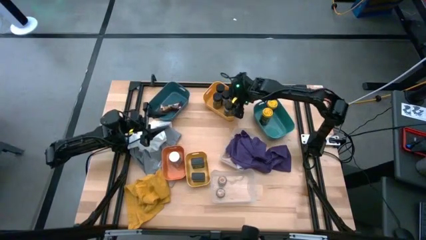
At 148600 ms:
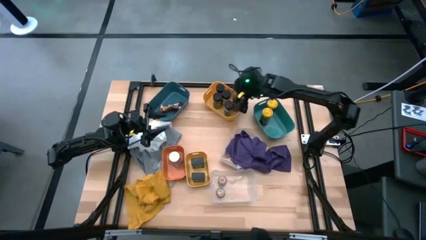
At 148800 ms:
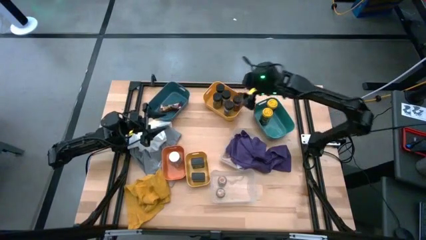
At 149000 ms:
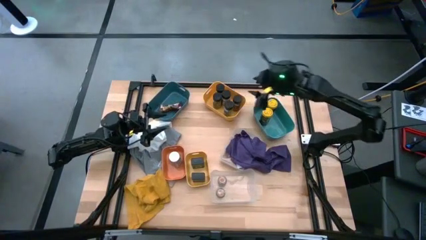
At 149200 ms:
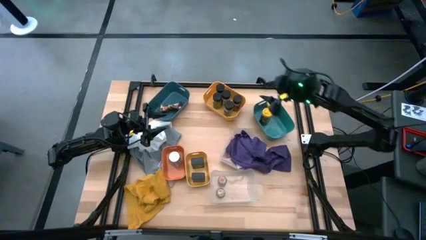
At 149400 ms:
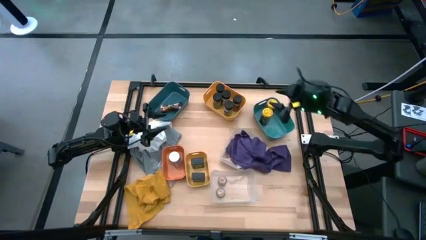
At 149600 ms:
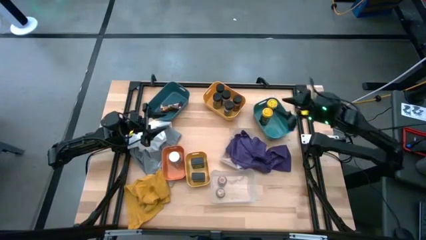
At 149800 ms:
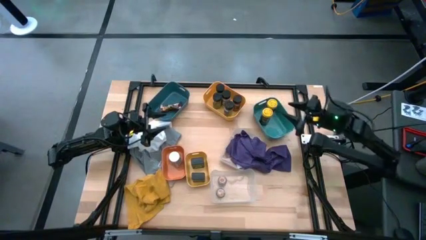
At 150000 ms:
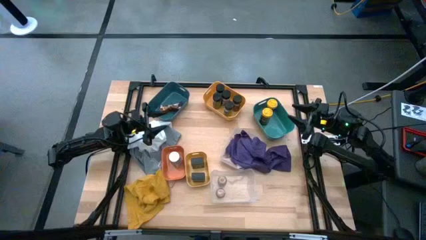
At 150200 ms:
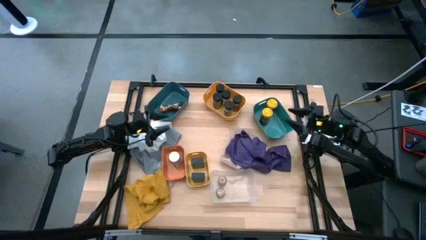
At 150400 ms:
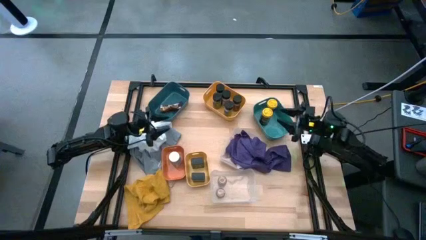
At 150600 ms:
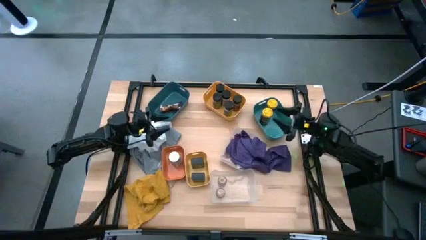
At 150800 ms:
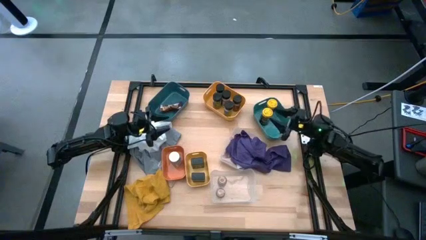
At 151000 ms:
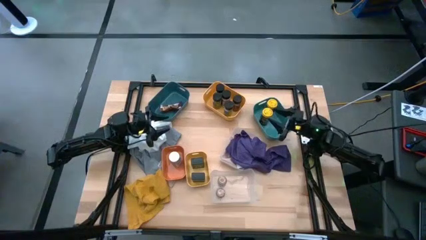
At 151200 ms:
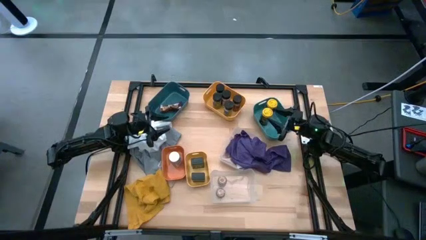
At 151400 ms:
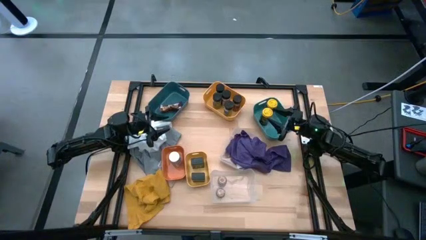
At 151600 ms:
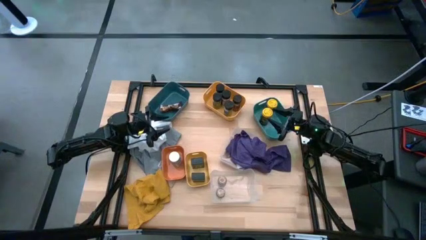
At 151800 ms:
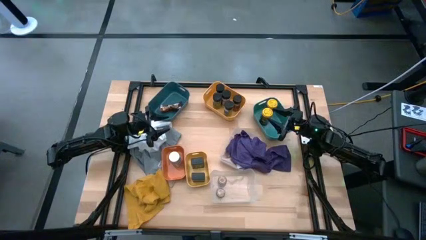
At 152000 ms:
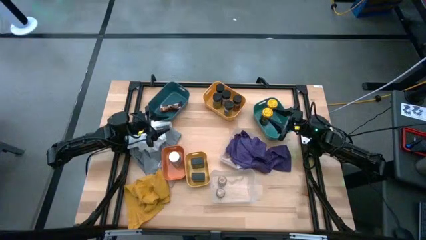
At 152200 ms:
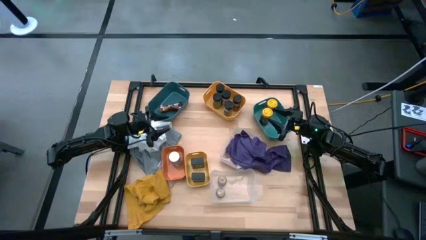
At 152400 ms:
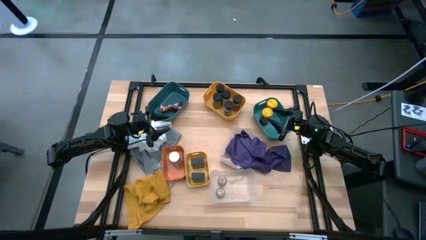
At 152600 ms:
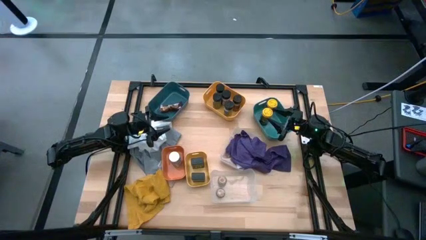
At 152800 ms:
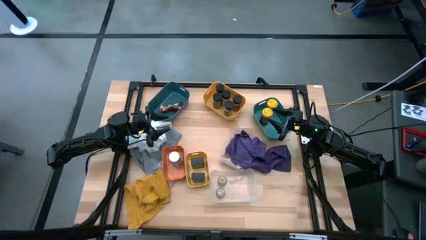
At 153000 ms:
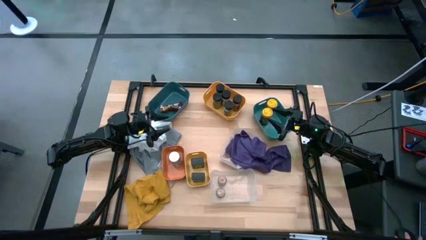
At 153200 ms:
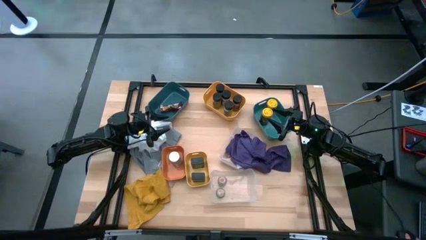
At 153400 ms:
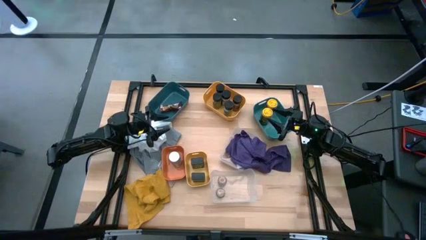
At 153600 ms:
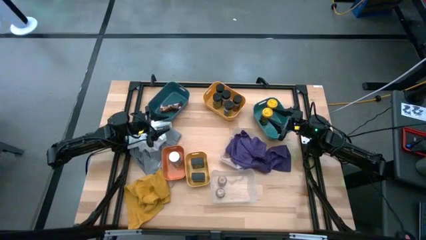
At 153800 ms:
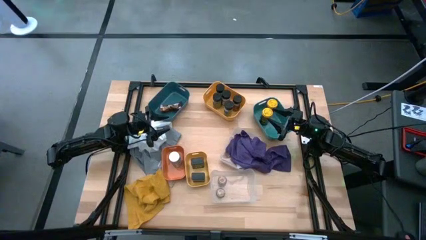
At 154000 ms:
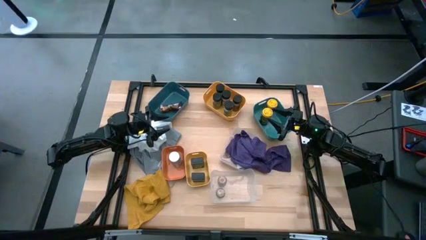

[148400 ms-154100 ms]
Task: Sort spices by type
Return to Home Position

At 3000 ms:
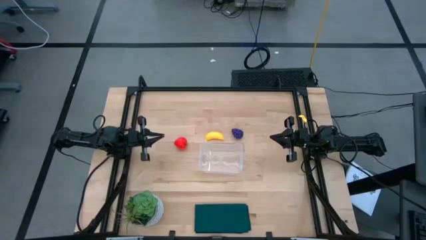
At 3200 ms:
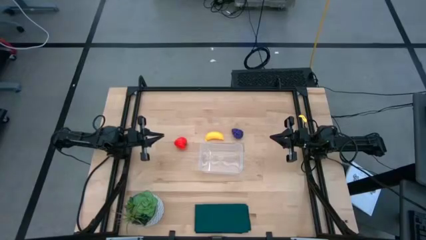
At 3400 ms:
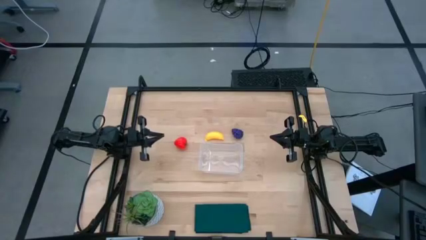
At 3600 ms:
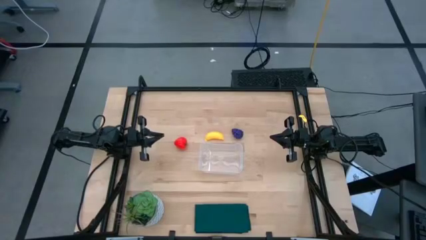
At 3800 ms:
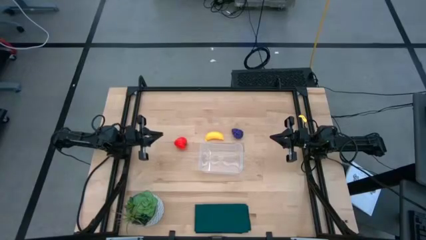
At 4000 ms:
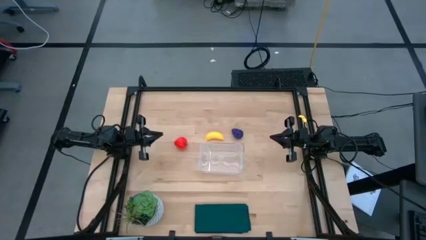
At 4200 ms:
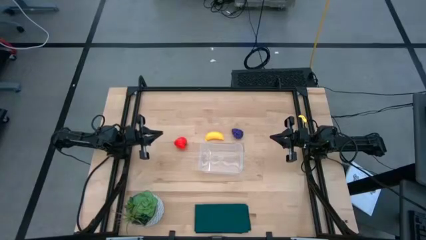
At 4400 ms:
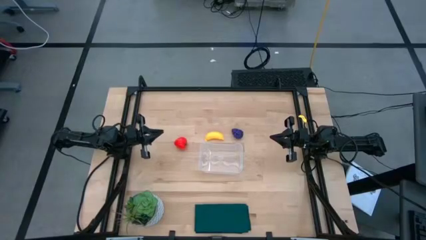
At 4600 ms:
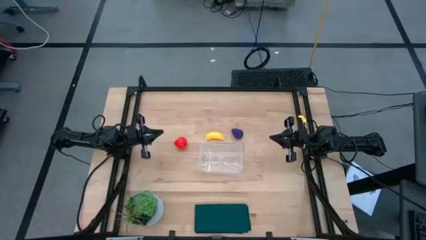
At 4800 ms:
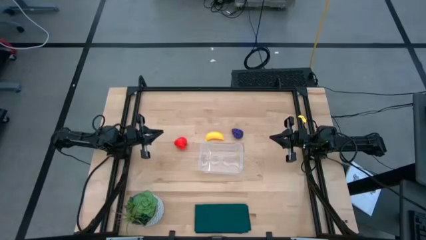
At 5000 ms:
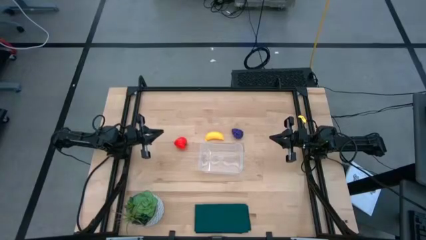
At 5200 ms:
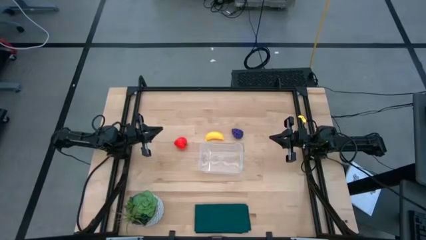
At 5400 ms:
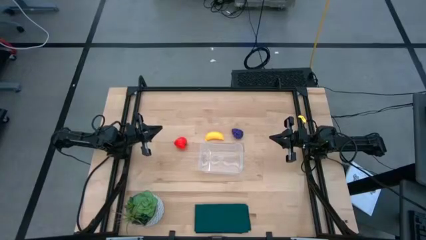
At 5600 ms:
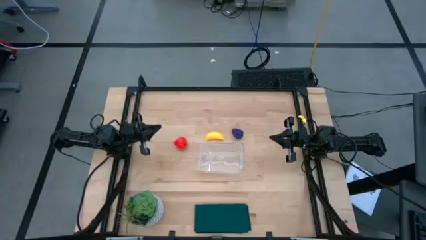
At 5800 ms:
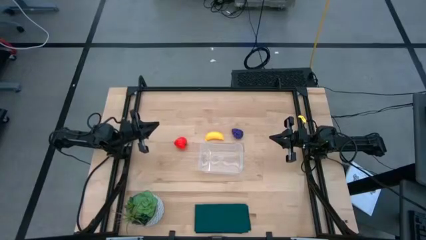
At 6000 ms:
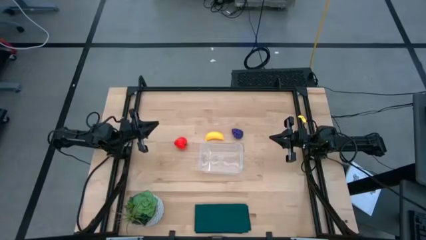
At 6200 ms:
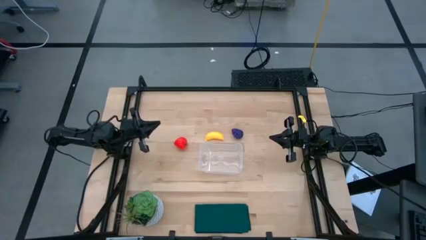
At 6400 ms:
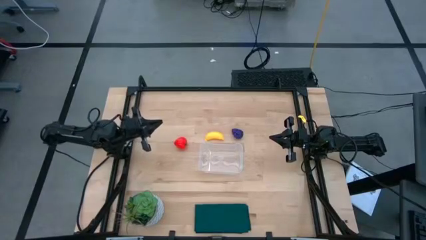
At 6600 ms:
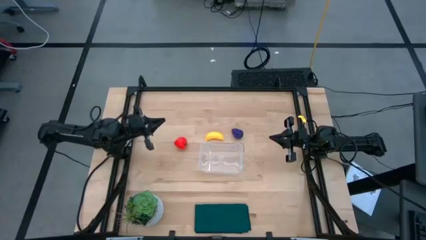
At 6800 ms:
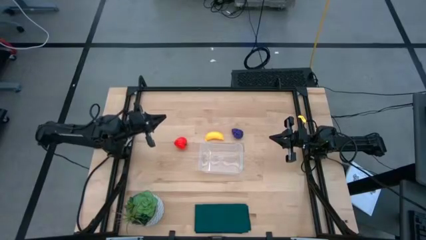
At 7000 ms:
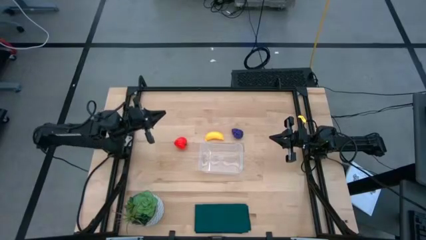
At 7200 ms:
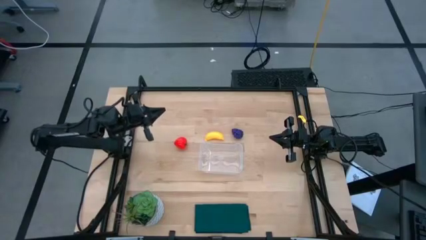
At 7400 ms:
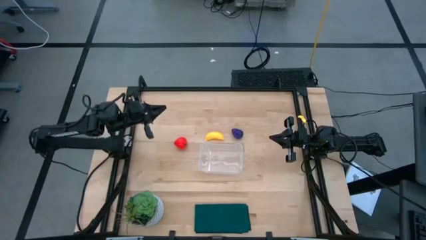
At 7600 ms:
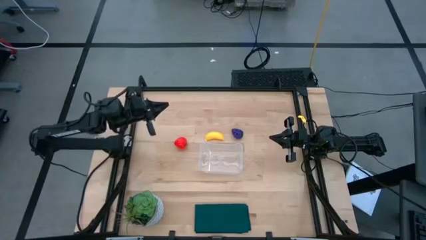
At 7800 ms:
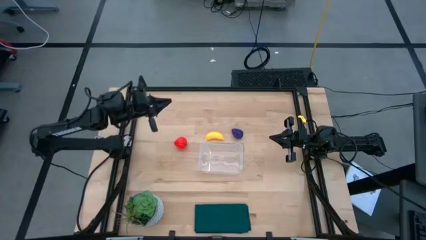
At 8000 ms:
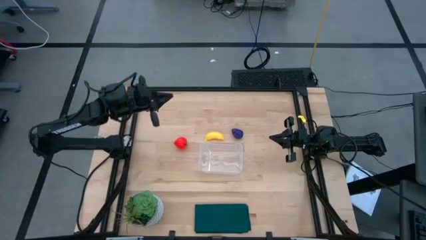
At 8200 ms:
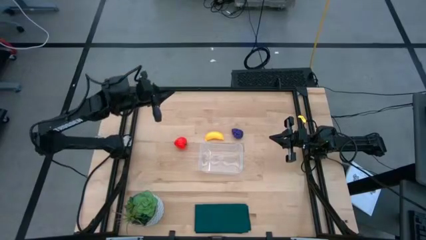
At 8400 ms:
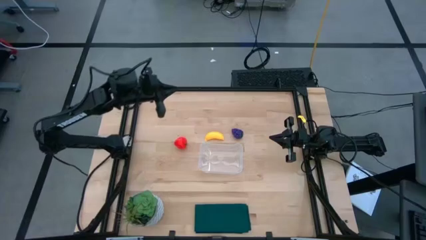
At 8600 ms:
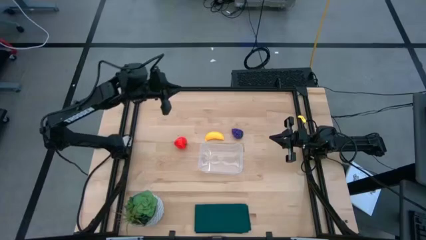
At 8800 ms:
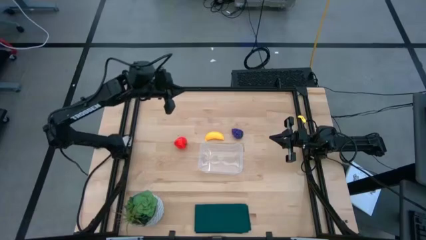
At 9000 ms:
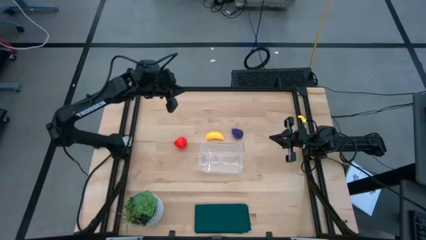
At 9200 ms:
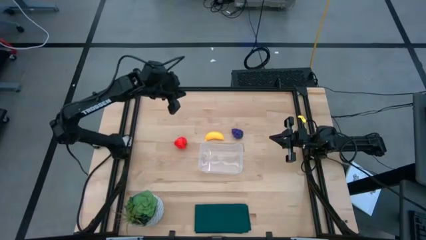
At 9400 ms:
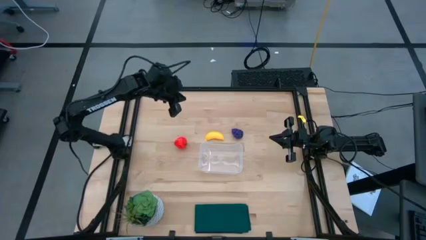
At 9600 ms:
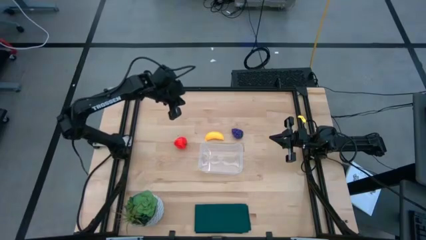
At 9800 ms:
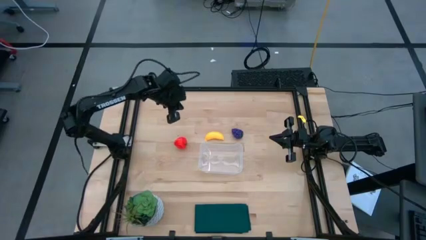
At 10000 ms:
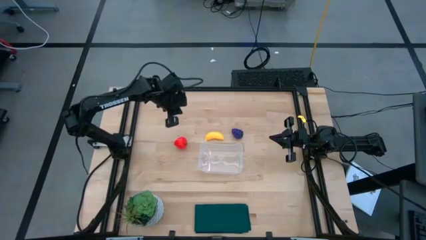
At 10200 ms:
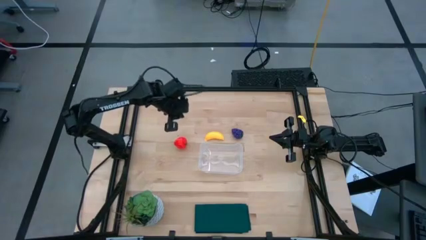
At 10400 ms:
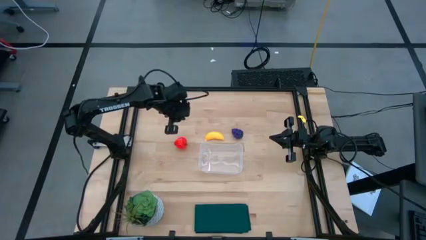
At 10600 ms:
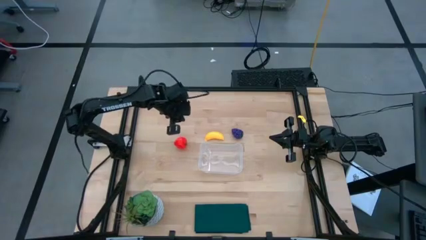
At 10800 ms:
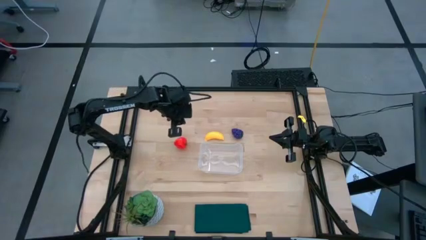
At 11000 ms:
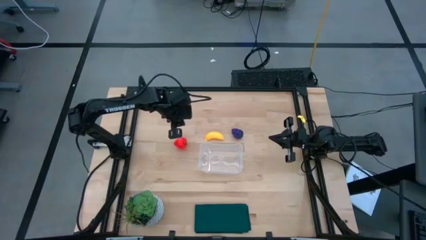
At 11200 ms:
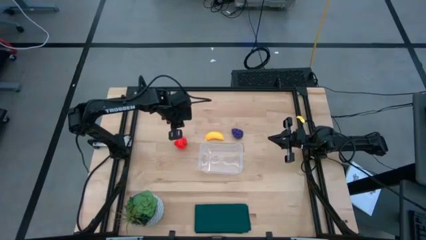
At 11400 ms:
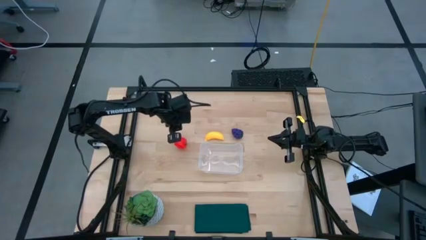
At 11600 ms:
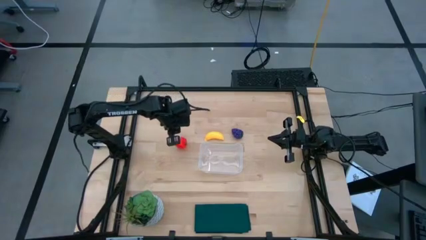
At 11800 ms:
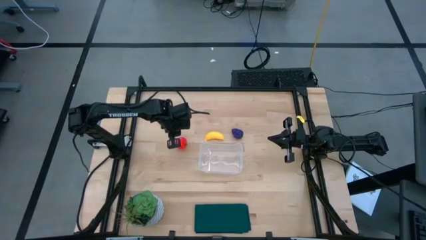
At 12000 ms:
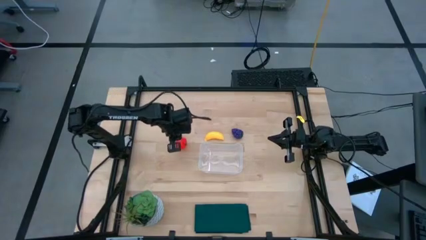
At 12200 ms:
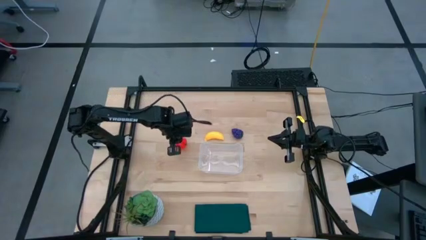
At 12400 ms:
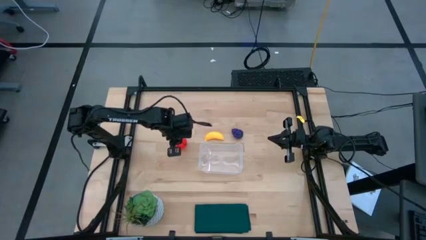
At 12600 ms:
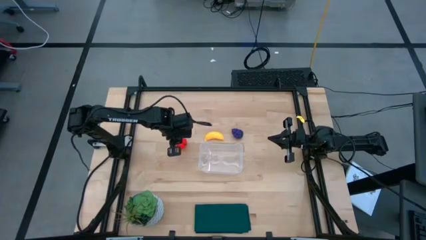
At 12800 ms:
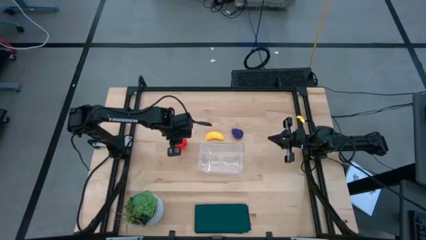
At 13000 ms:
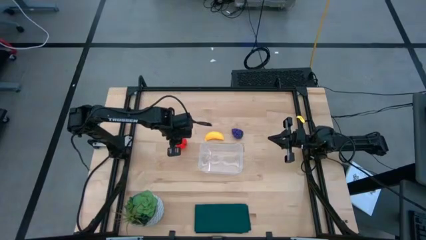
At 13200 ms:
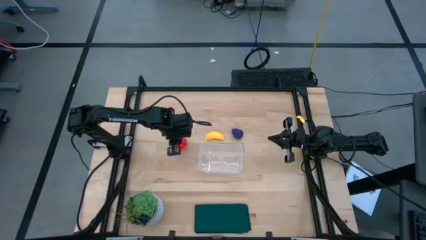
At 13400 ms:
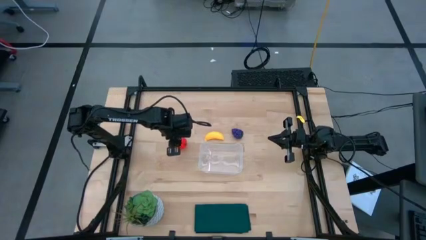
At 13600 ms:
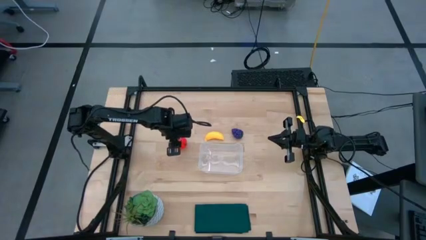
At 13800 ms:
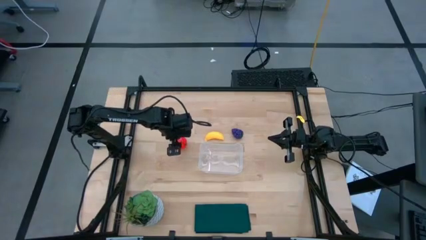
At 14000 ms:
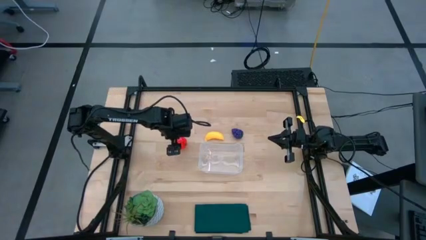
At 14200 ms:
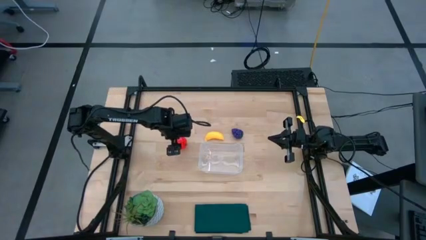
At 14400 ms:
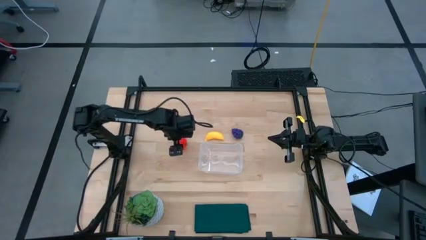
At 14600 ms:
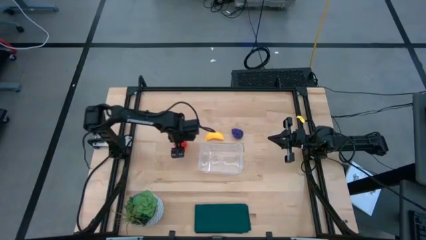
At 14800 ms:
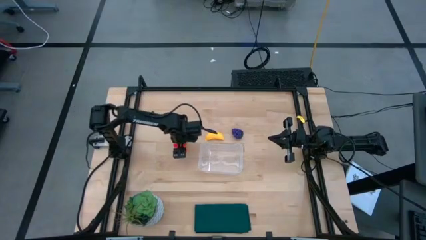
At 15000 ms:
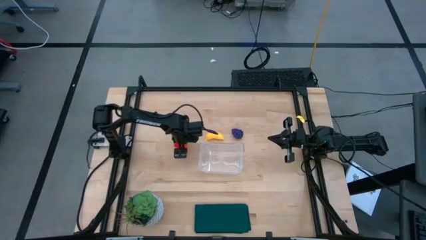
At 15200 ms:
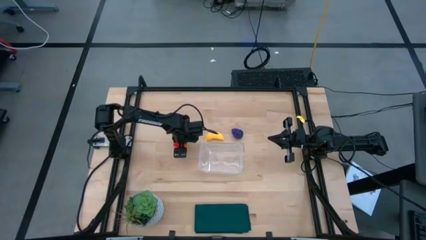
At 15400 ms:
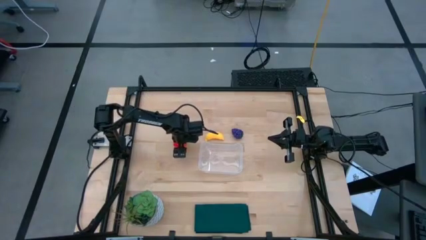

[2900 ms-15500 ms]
Task: Pick and placing Produce into tupperware
Put the apple into the transparent bin
